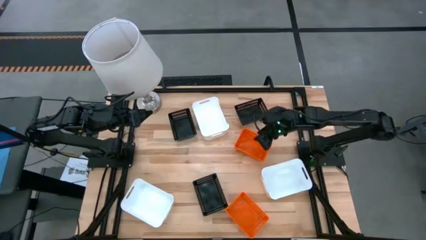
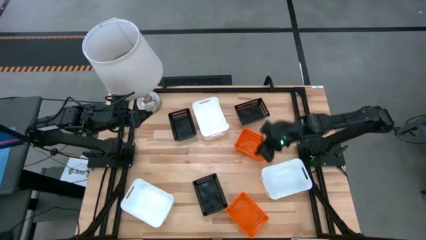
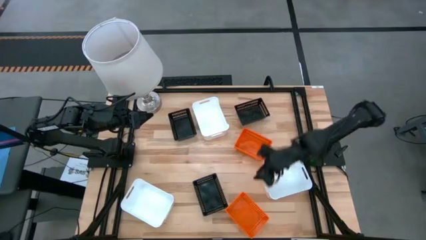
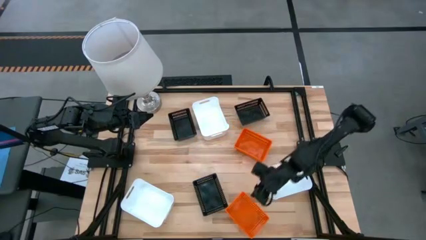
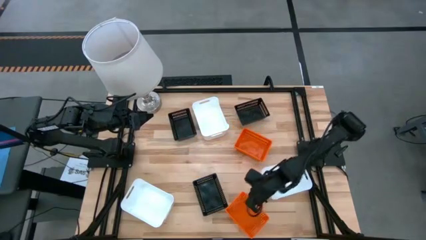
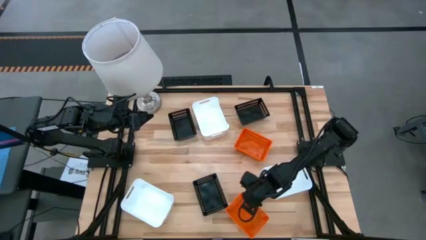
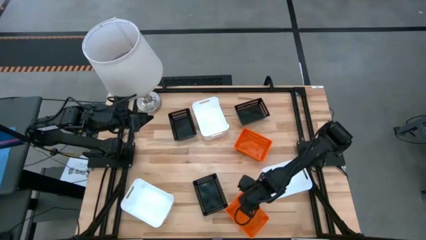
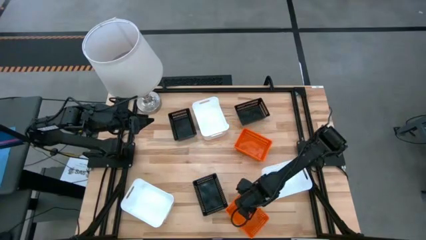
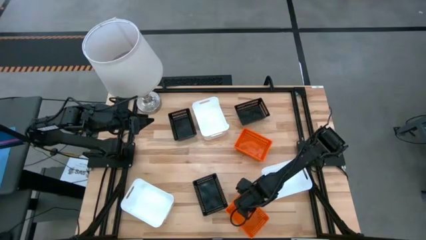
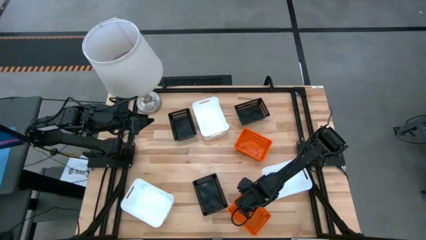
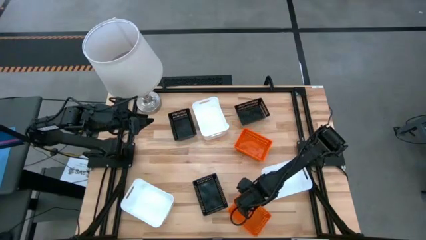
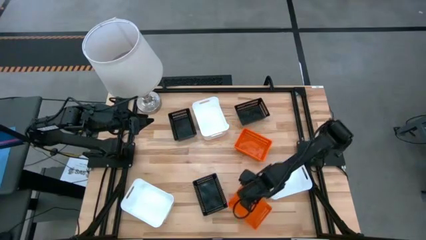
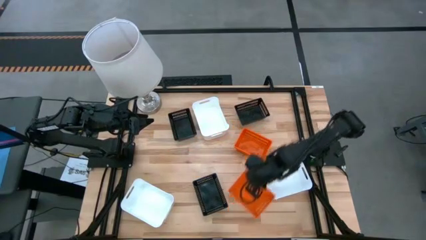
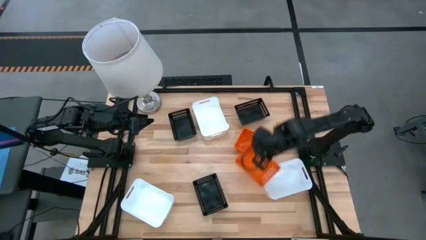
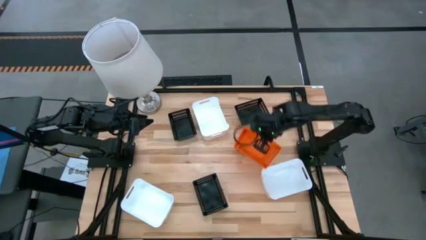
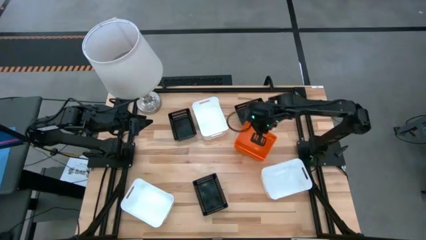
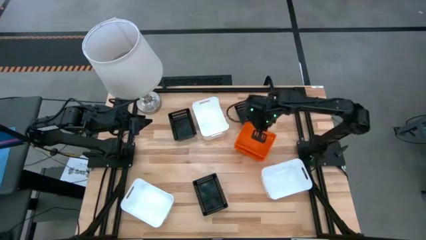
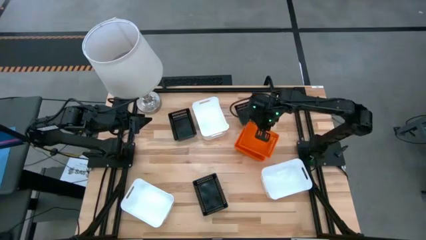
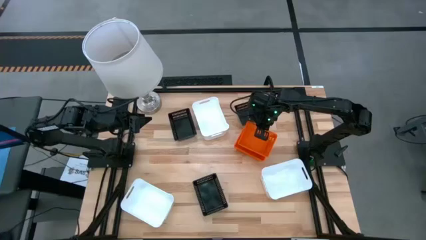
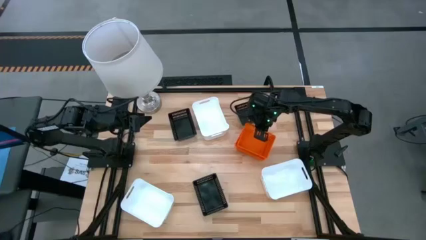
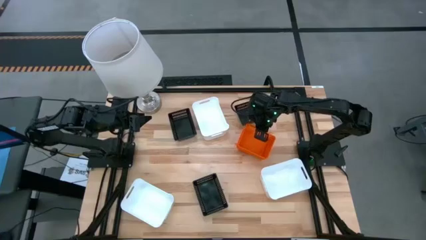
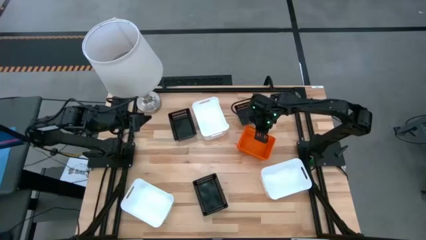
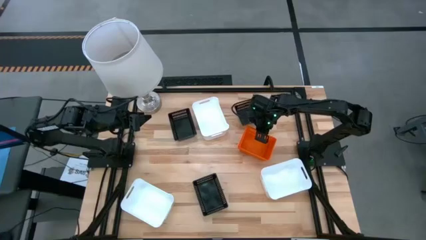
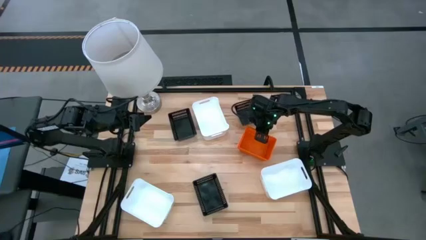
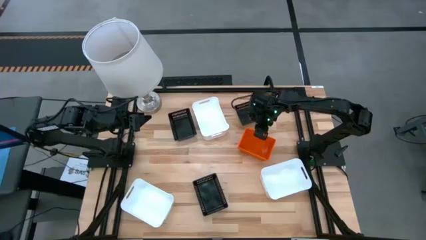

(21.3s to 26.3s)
Stack the bottom orange bin on the orange bins

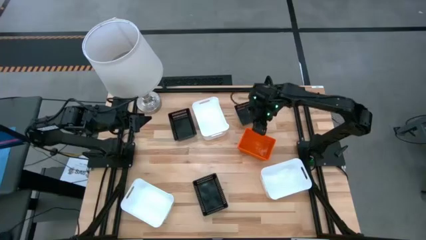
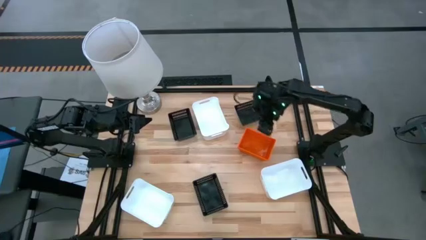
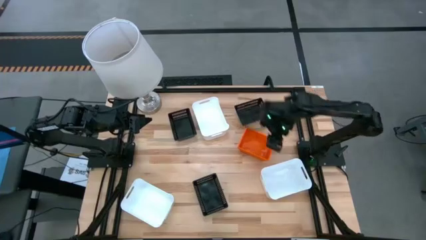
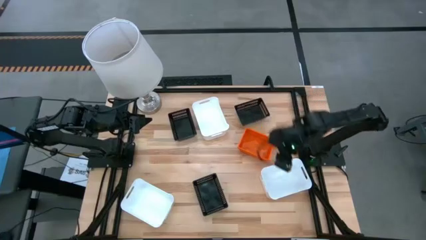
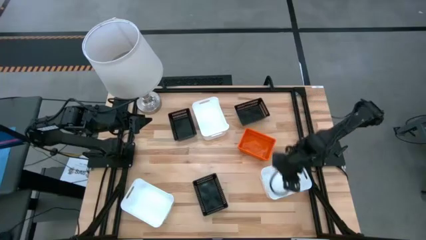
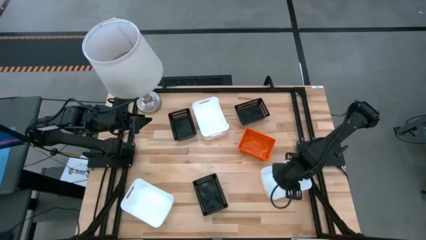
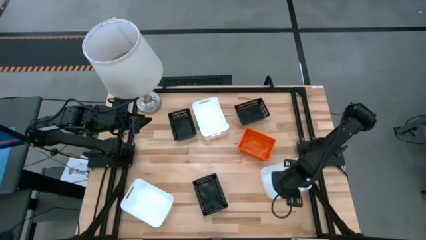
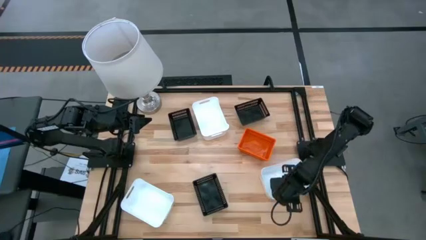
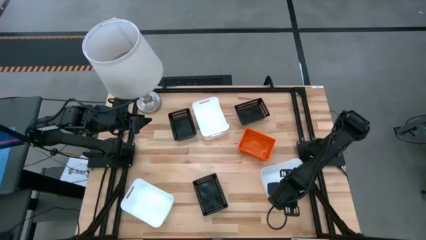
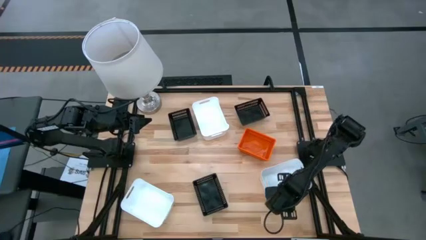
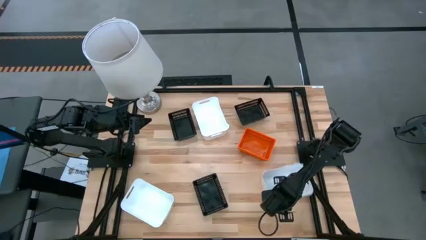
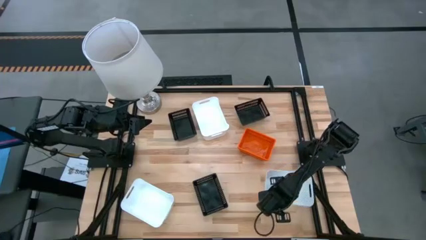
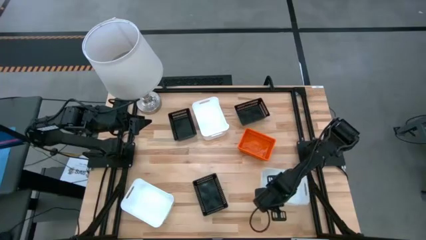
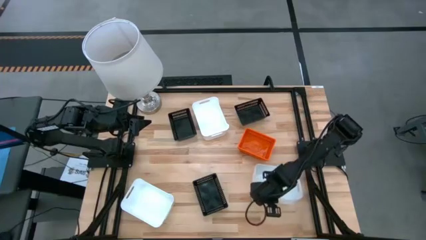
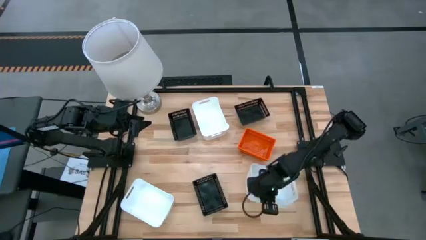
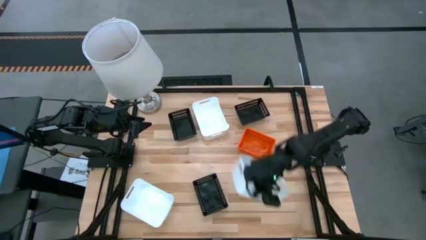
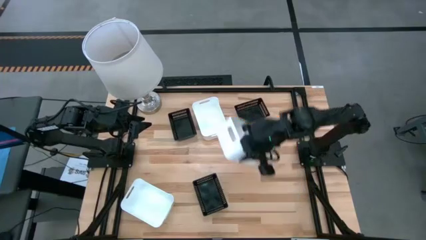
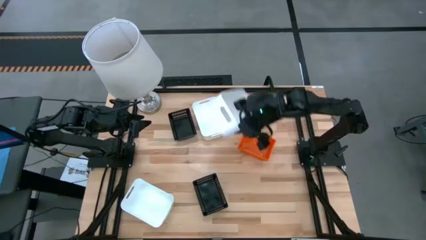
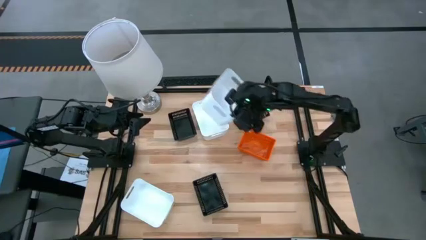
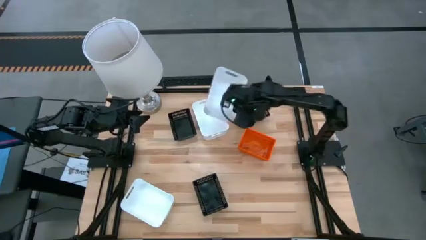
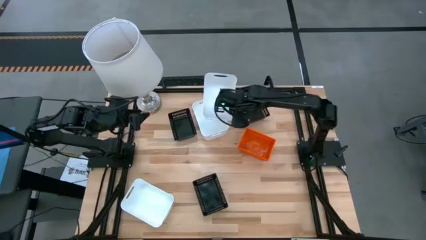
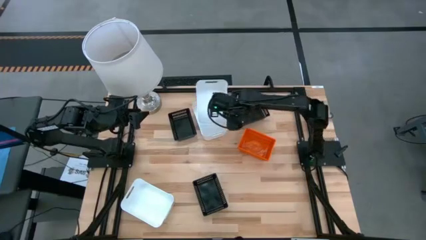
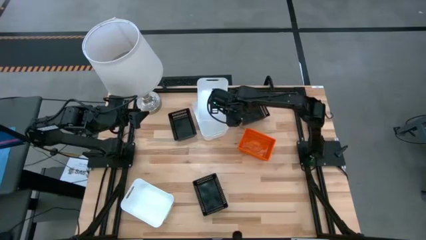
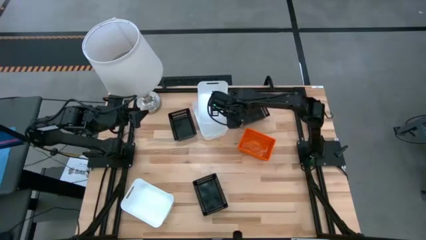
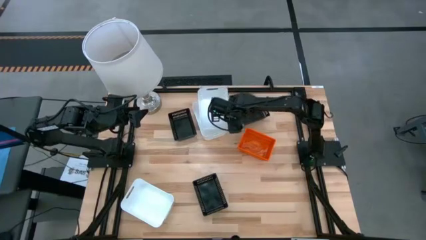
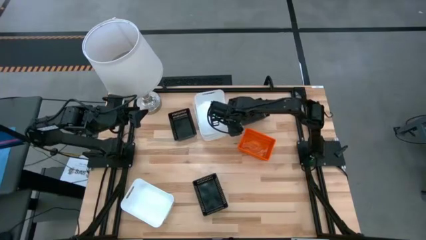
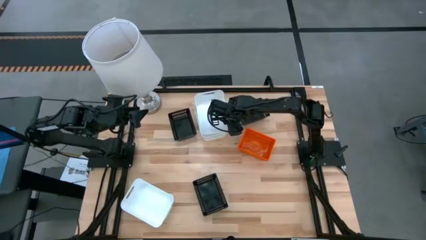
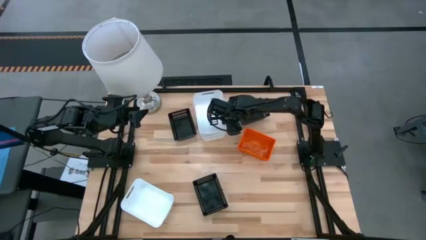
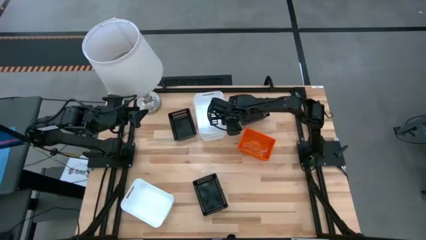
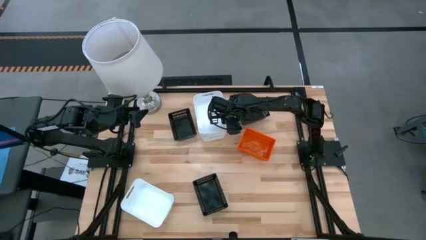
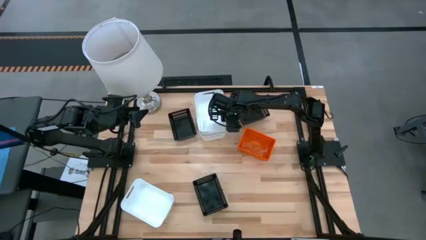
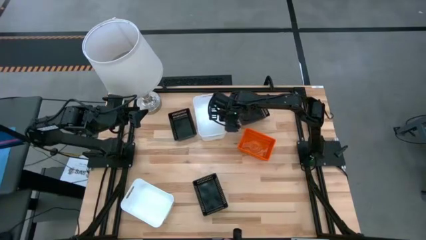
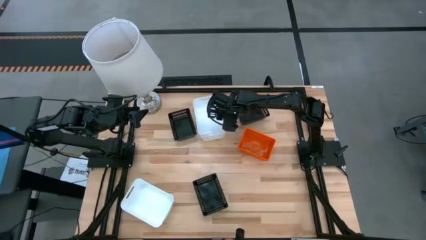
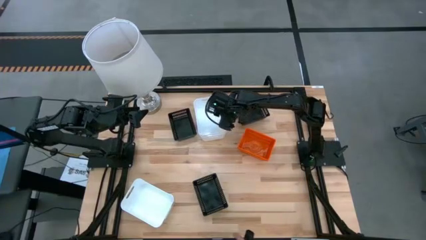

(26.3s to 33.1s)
Stack the bottom right white bin on the top white bin

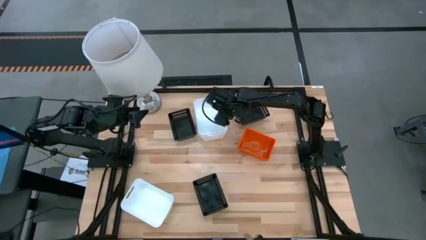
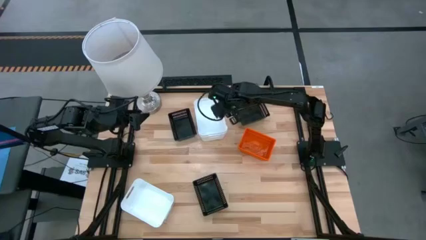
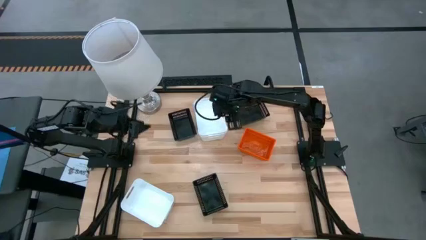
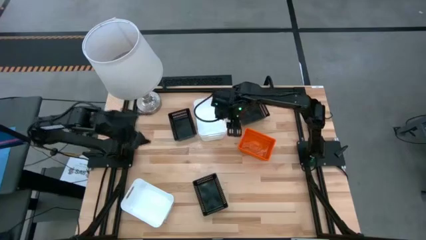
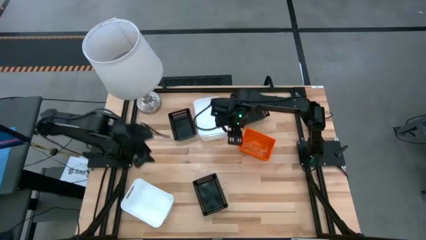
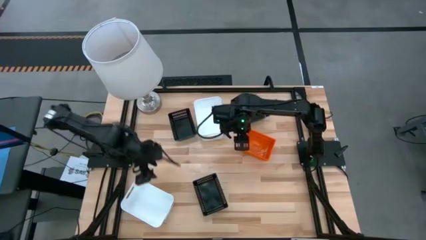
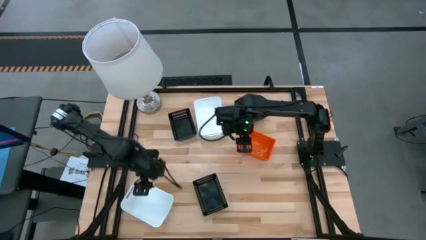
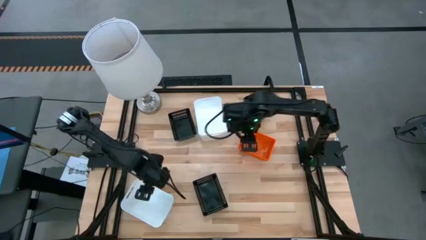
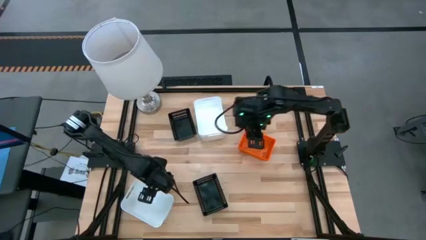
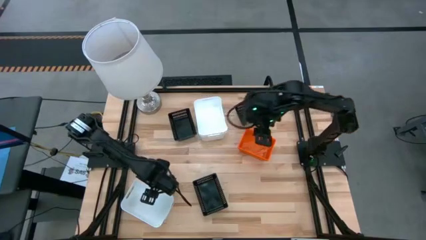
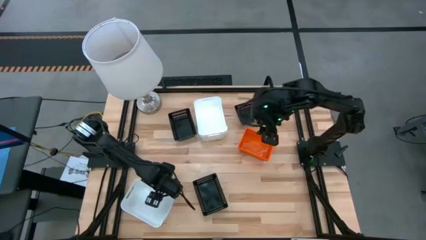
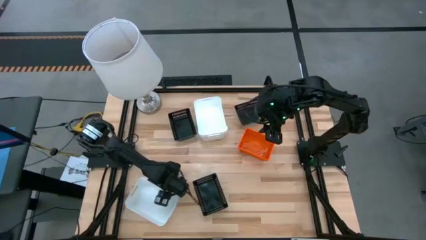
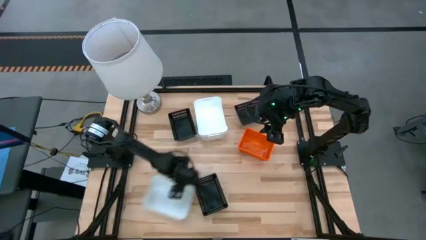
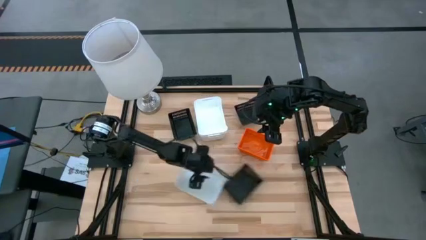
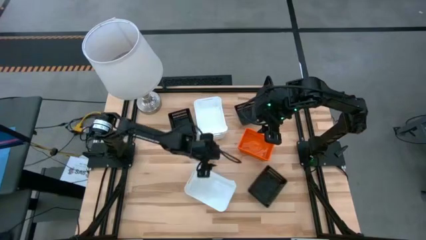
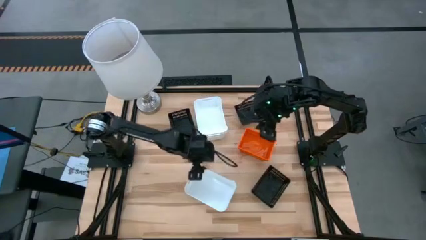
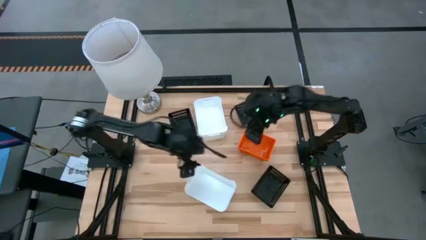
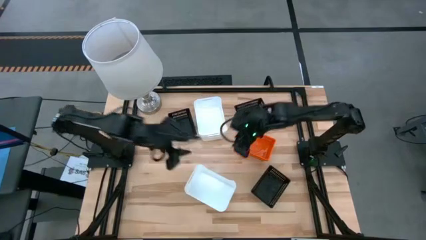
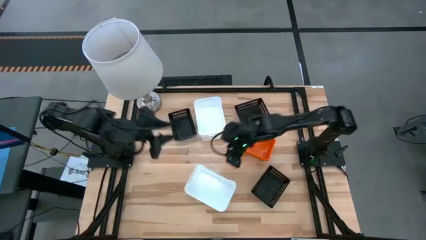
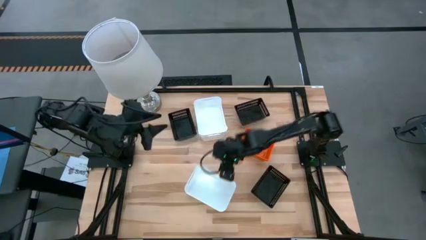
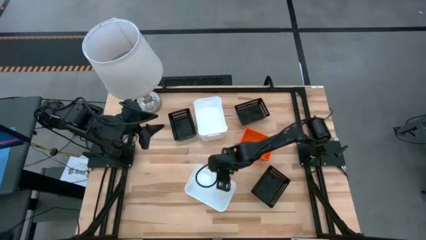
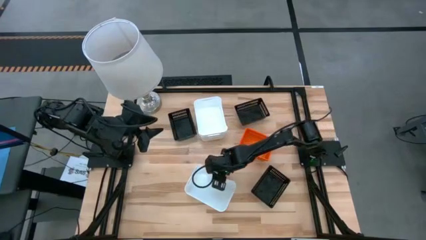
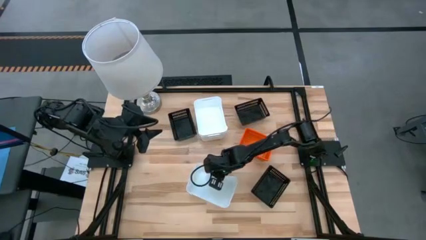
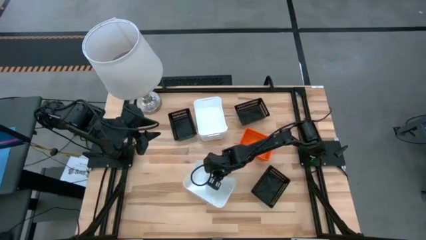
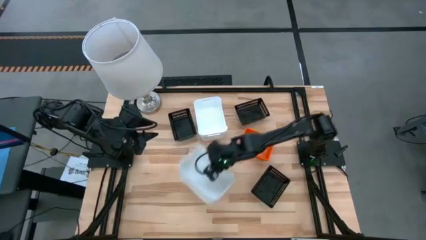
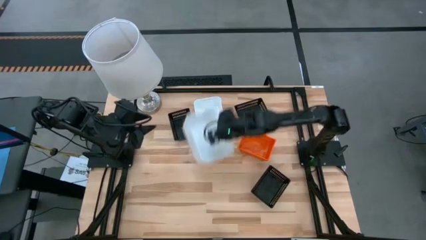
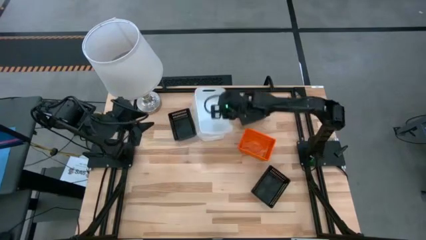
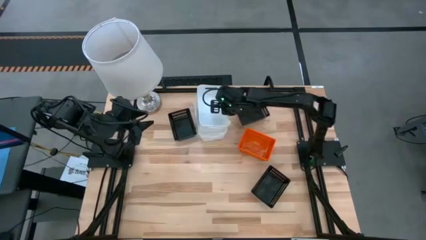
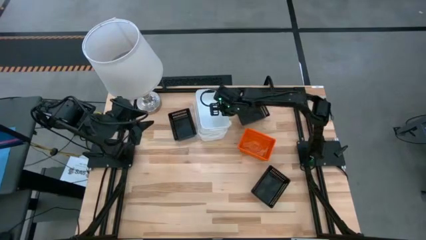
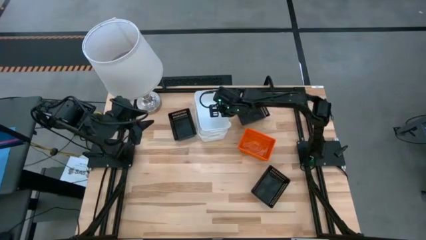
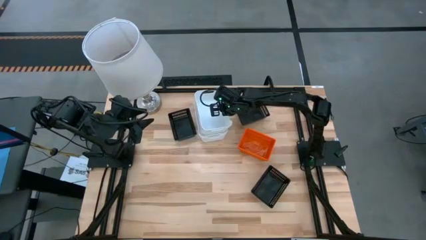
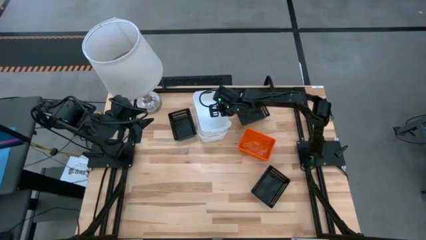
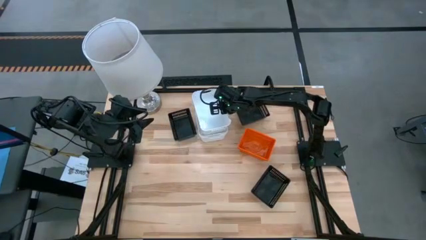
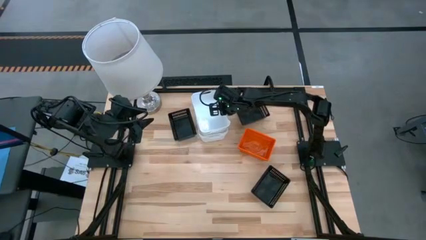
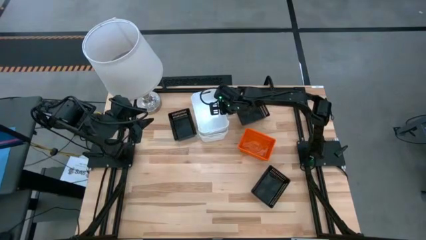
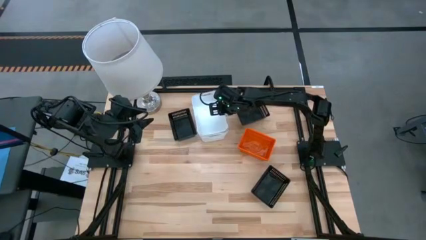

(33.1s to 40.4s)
Stack the bottom white bin on the white bins
